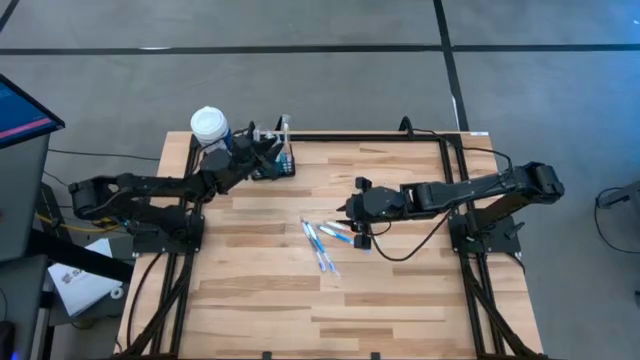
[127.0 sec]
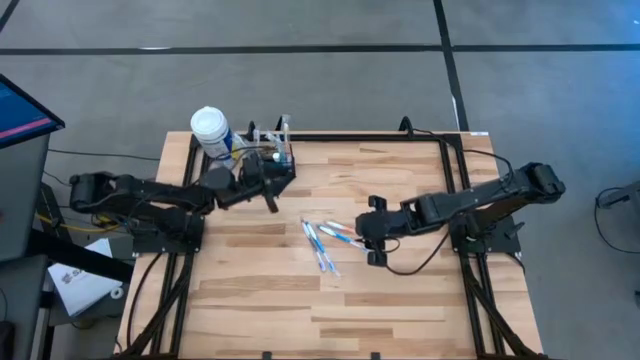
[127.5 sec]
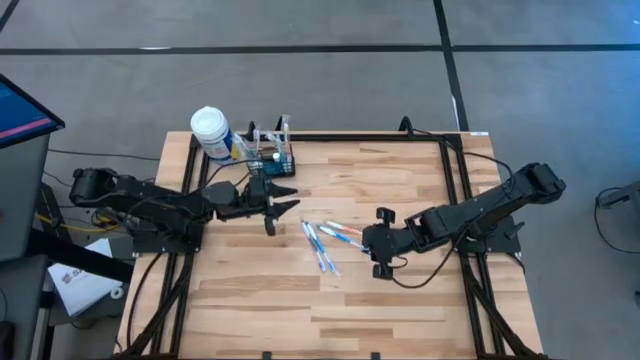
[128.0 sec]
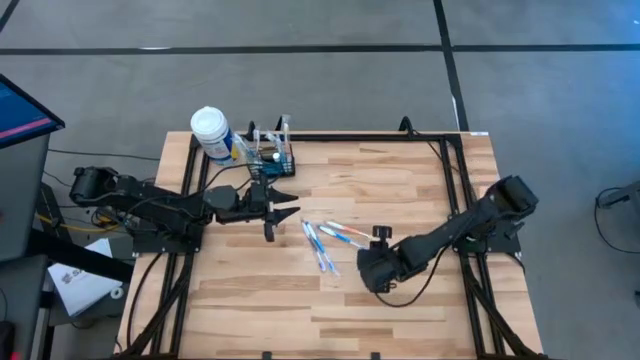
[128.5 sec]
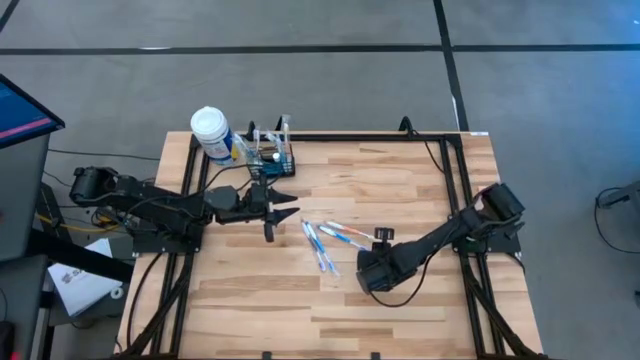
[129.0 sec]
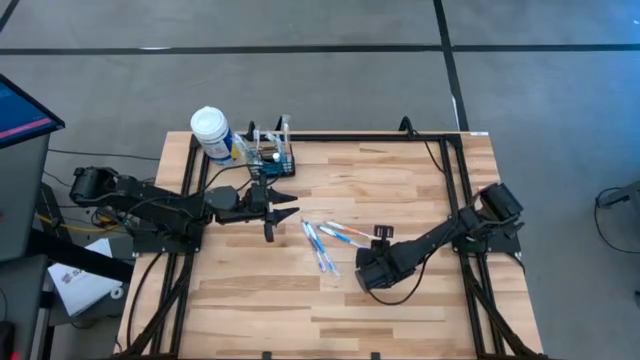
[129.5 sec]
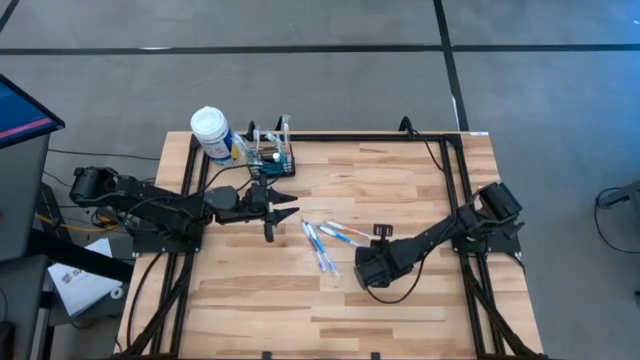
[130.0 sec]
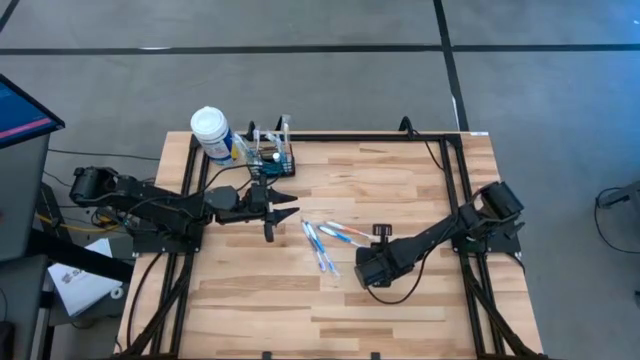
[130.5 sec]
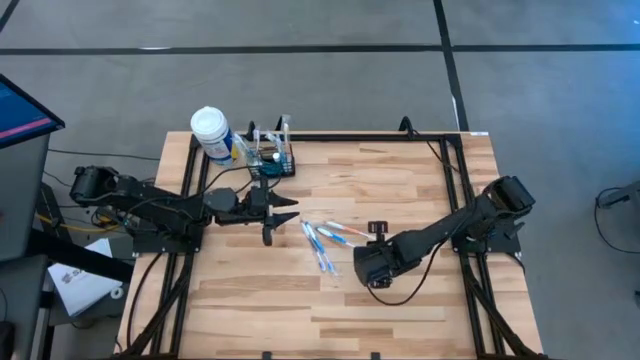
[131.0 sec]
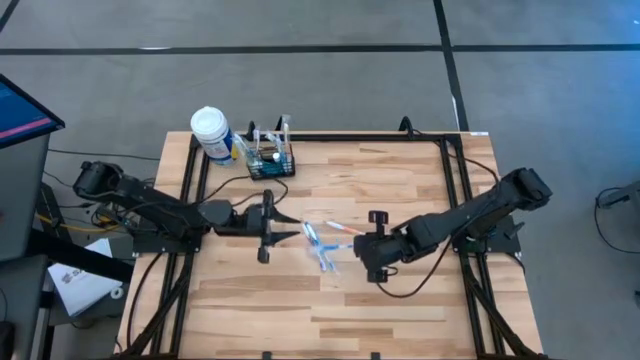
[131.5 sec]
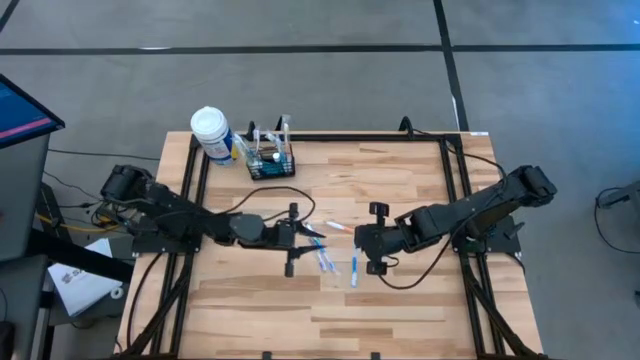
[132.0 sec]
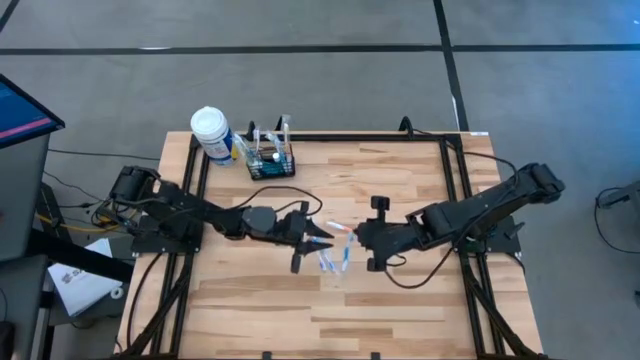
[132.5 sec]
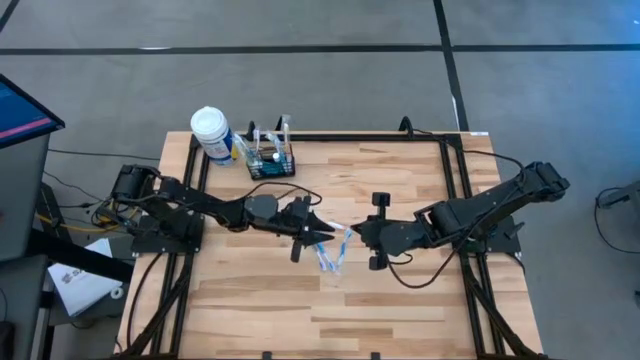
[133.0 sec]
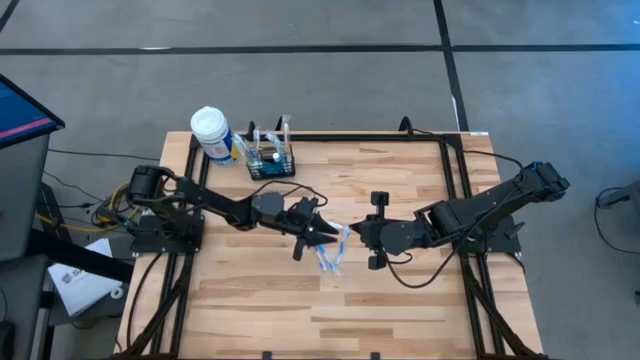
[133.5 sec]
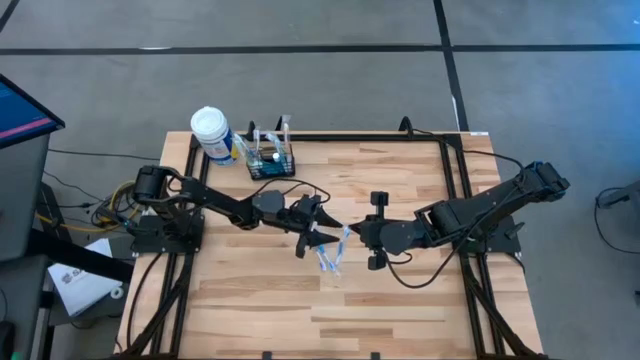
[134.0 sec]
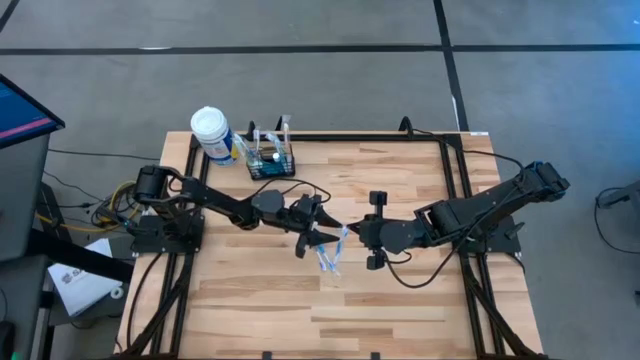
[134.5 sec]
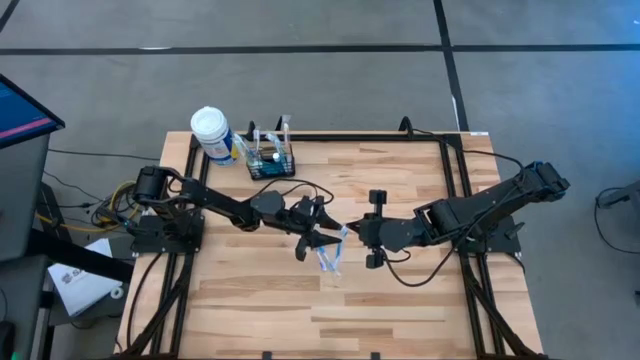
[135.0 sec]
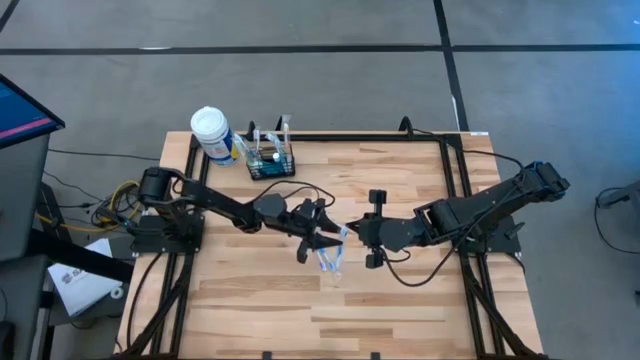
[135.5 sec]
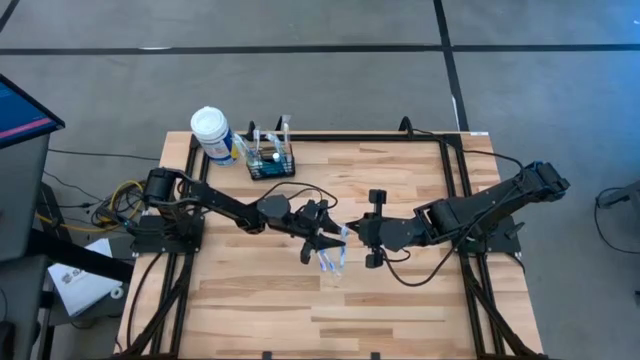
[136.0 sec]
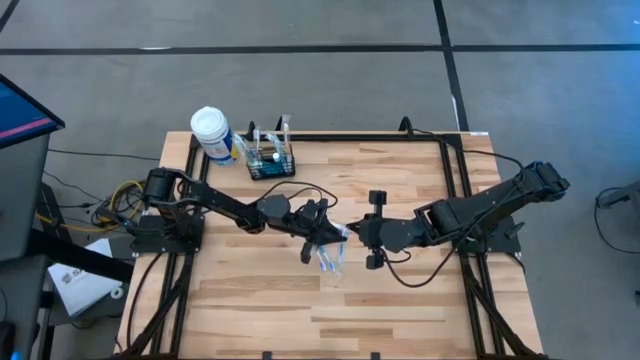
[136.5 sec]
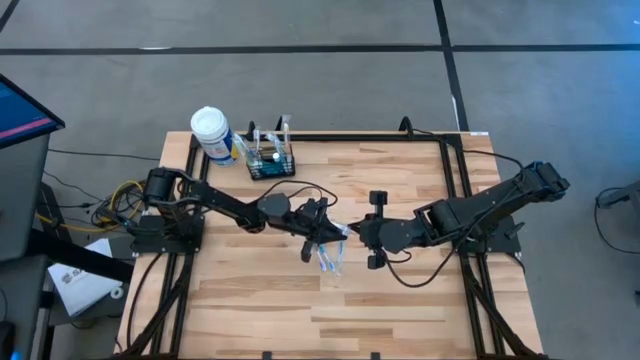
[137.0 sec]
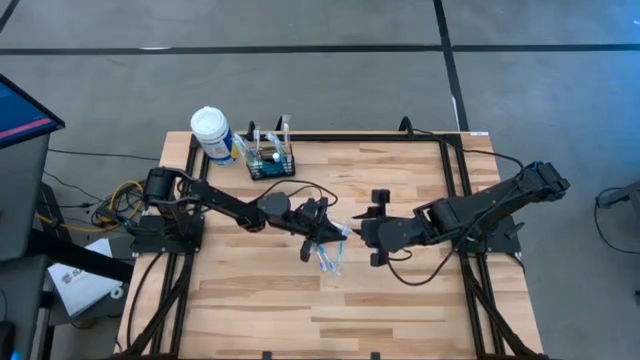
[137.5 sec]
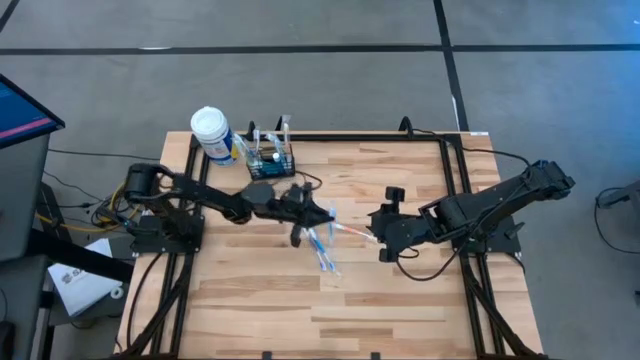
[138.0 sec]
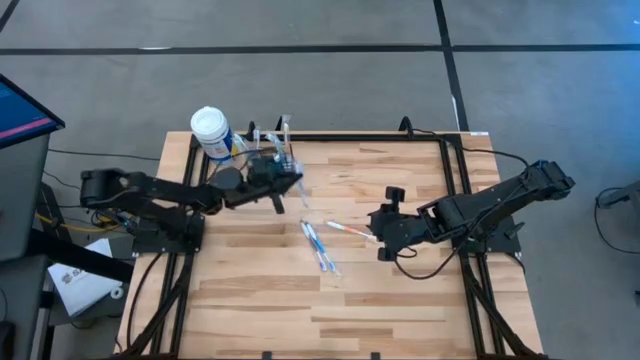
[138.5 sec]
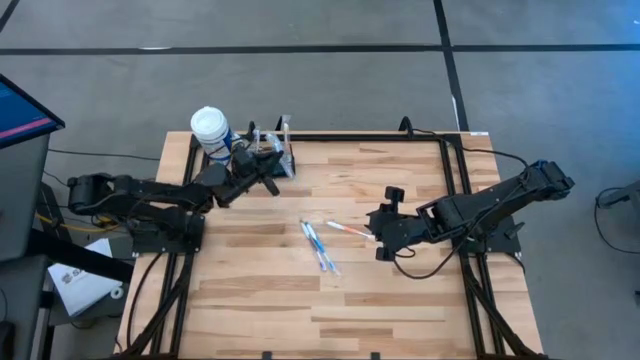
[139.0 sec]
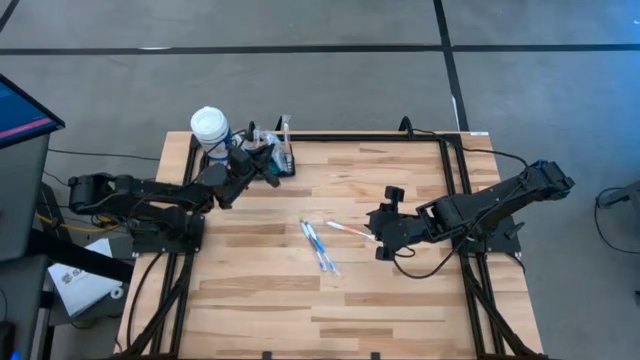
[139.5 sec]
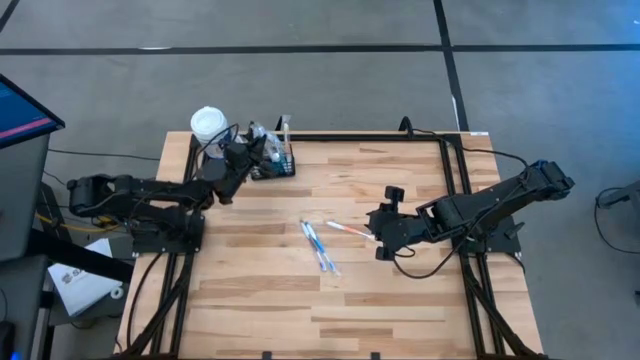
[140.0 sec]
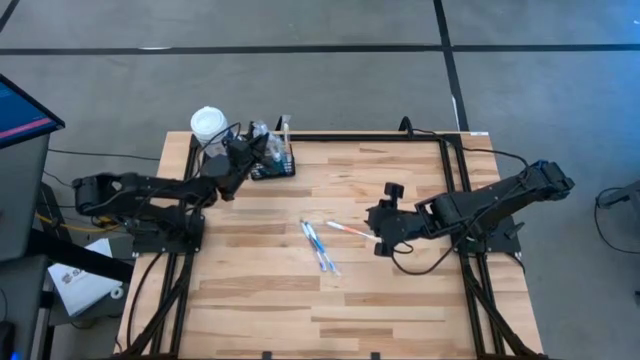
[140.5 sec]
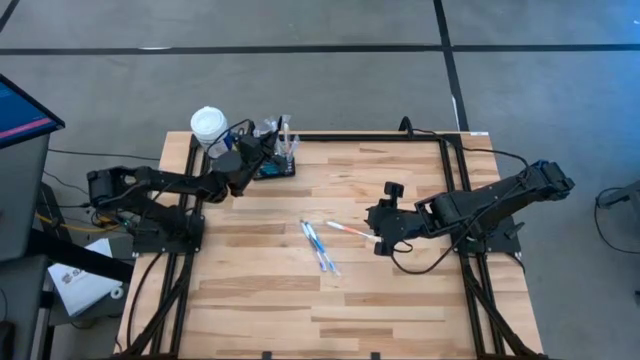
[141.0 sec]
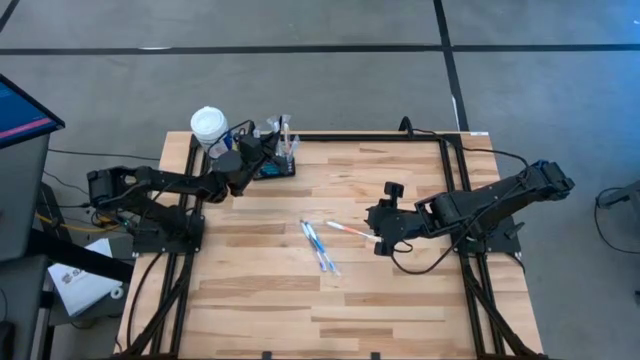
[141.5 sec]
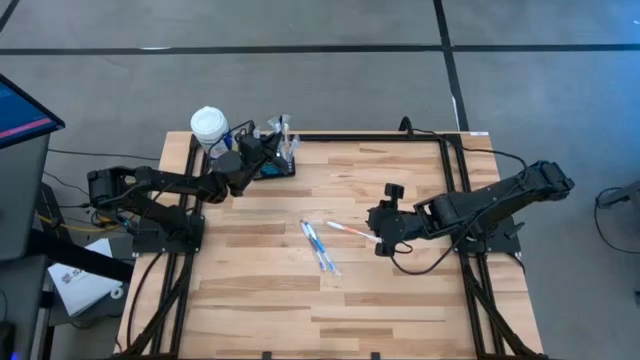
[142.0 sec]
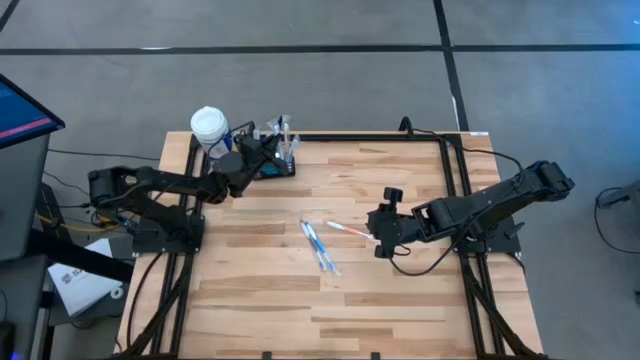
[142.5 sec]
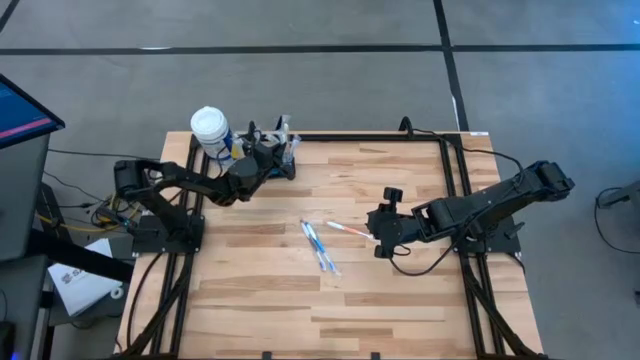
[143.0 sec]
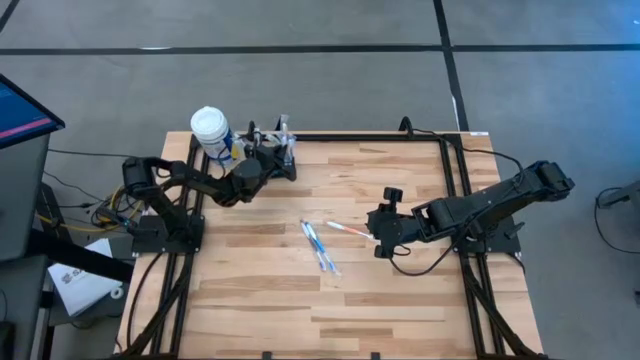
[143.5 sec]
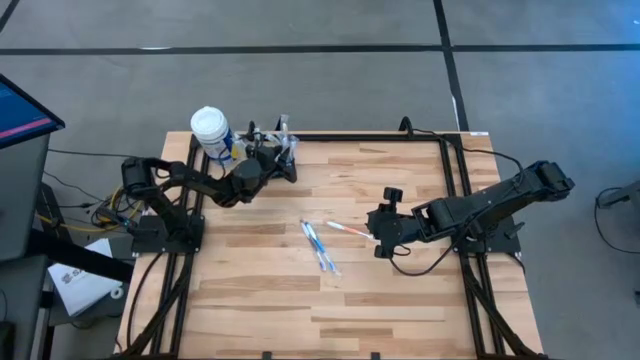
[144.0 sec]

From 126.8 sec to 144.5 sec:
Task: Pick & Place toothbrushing station
Put the blue toothbrush into the black wire organizer

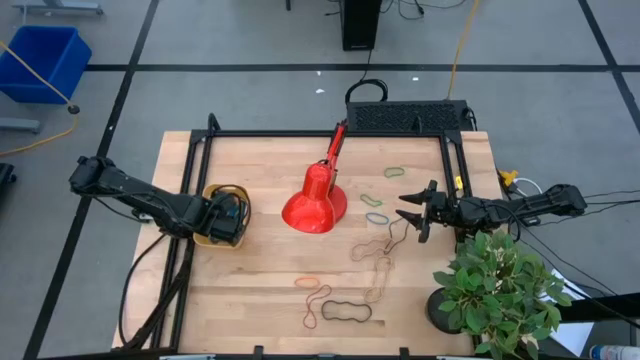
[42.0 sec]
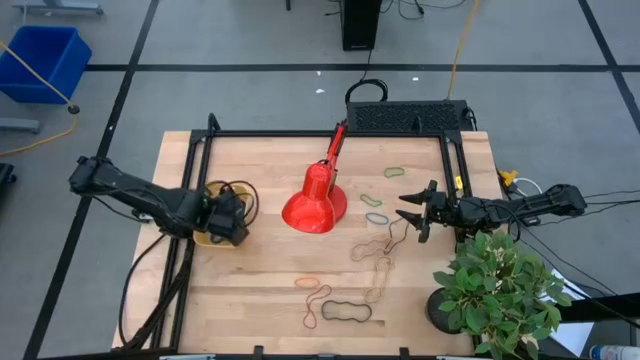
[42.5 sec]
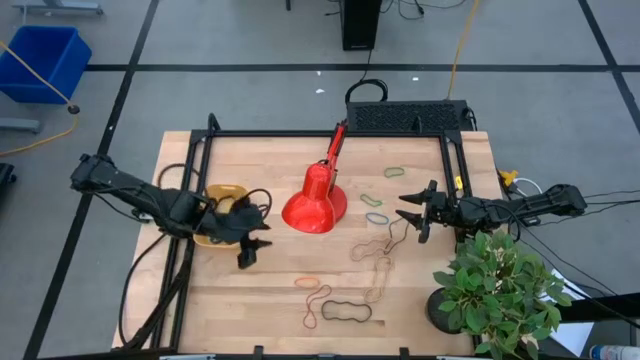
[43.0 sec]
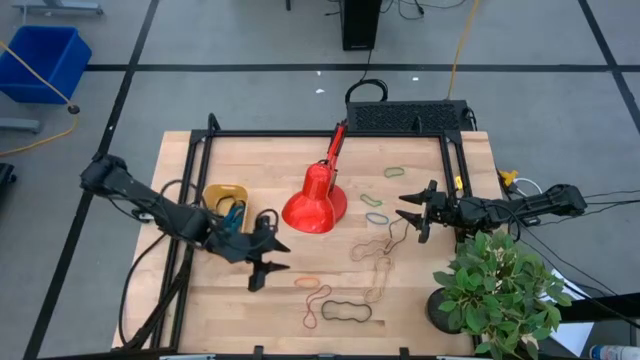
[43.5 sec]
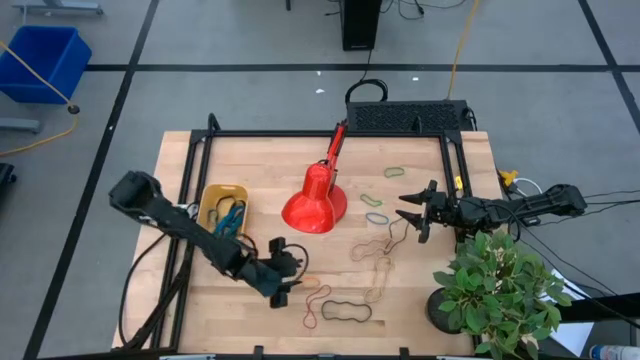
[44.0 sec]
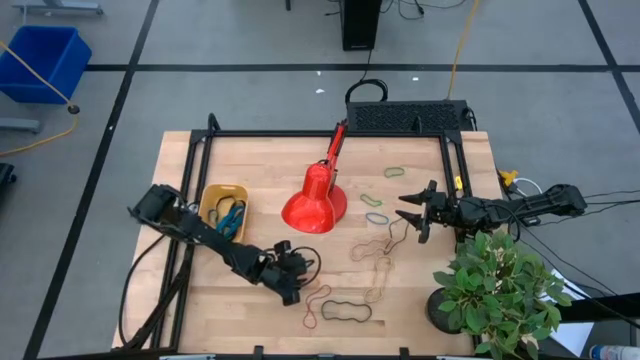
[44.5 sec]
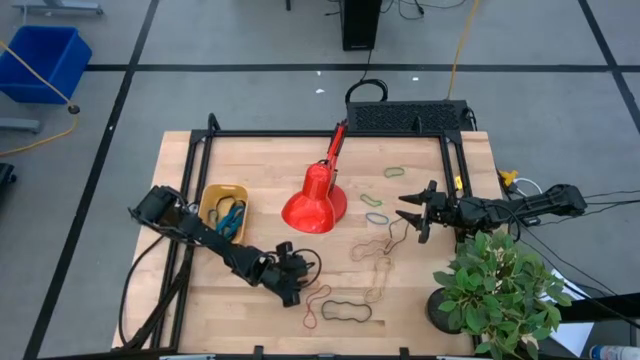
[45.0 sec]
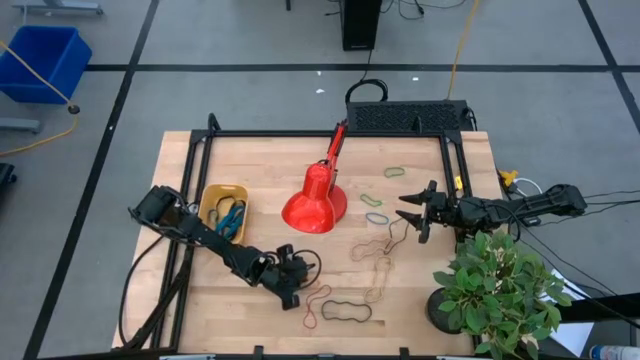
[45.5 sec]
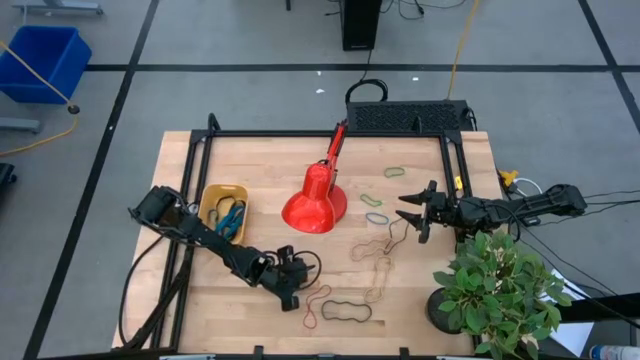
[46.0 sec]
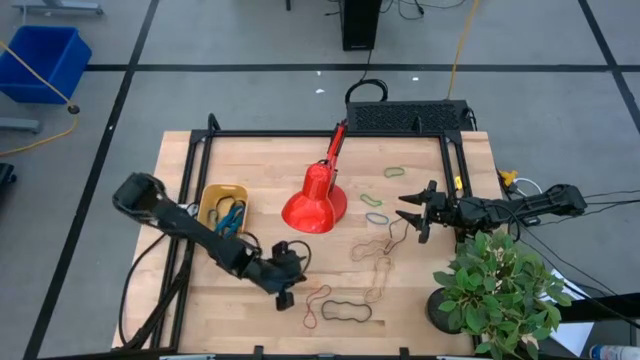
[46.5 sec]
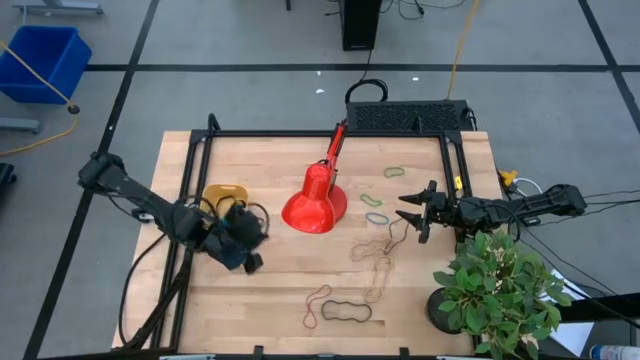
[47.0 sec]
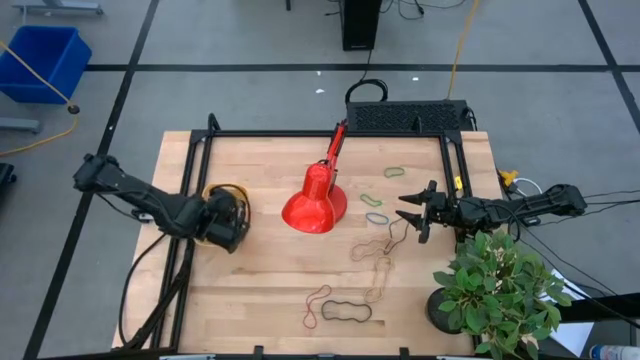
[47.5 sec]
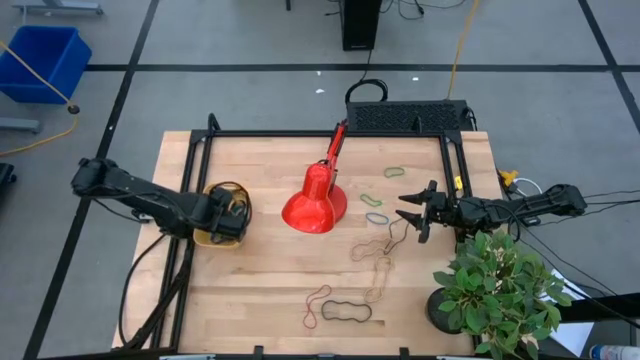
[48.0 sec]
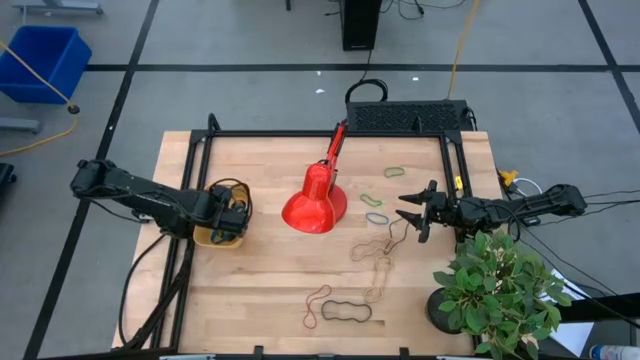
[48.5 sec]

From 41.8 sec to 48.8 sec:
Task: Pick and place rubber bands into bin
Put the orange rubber band into the yellow bin
